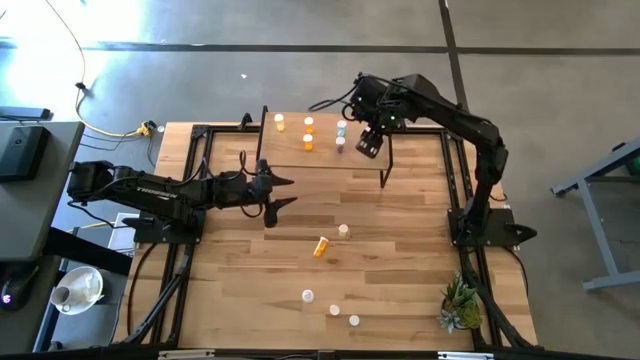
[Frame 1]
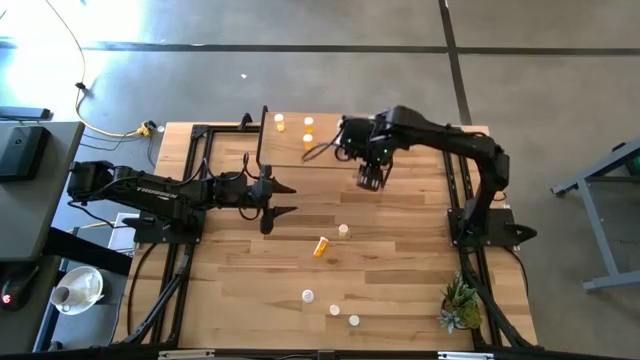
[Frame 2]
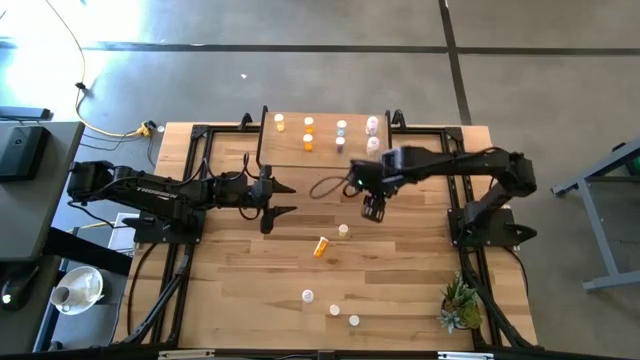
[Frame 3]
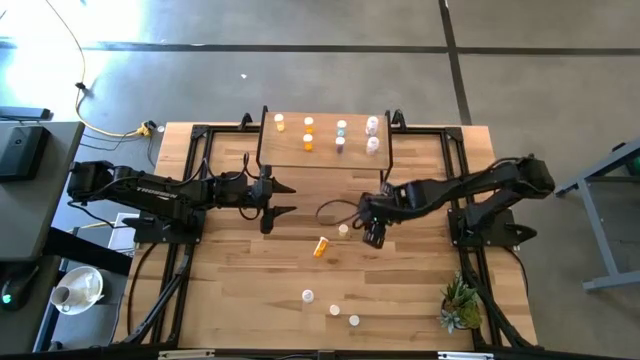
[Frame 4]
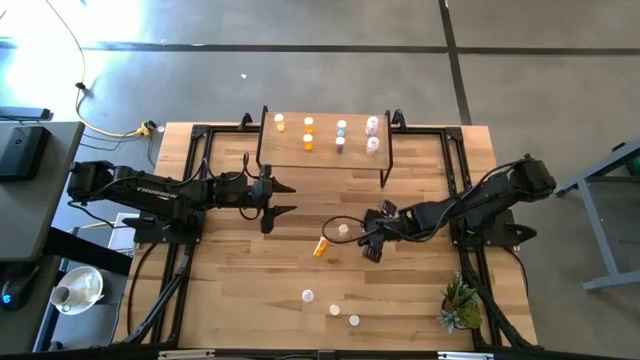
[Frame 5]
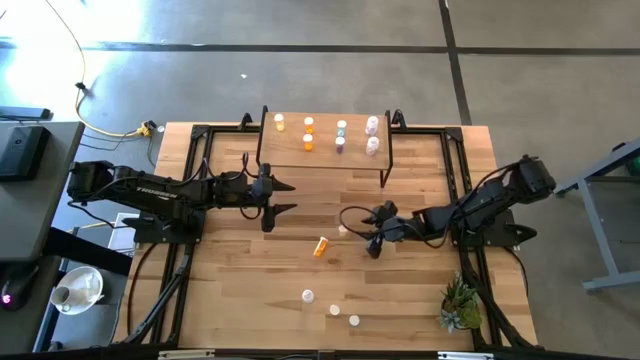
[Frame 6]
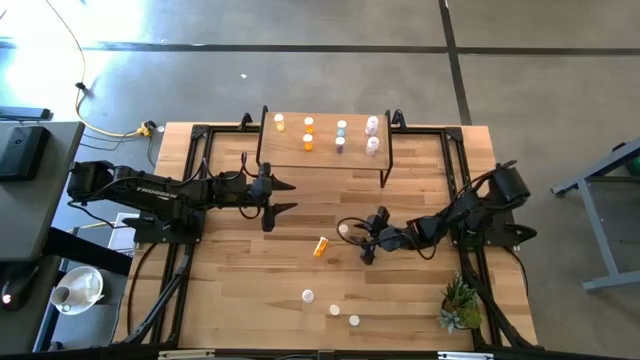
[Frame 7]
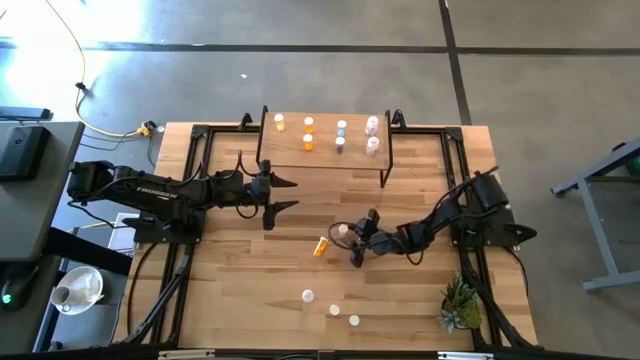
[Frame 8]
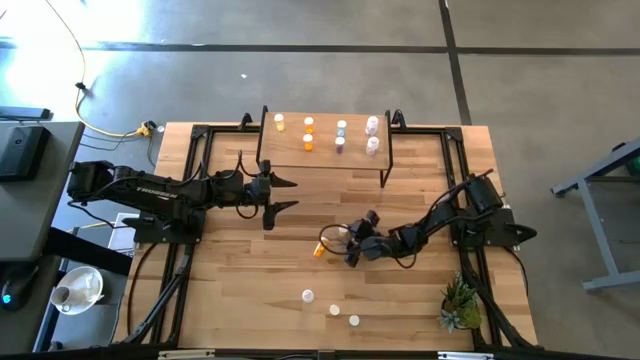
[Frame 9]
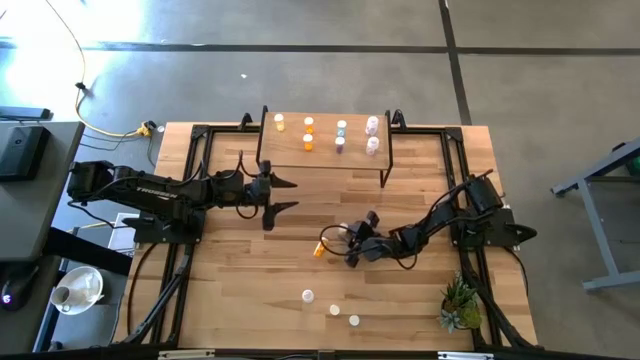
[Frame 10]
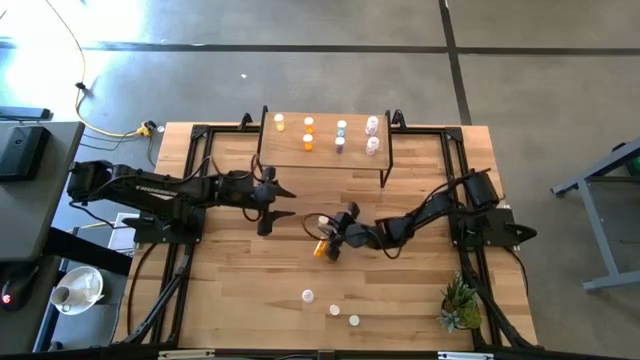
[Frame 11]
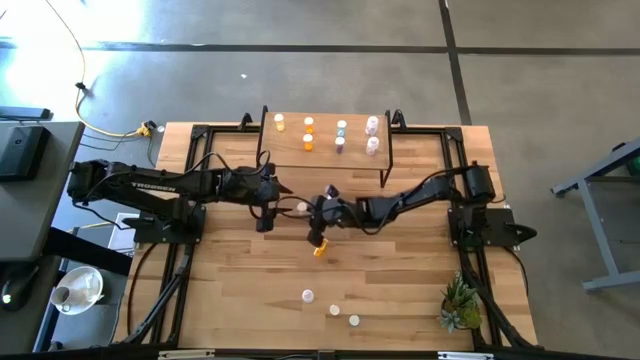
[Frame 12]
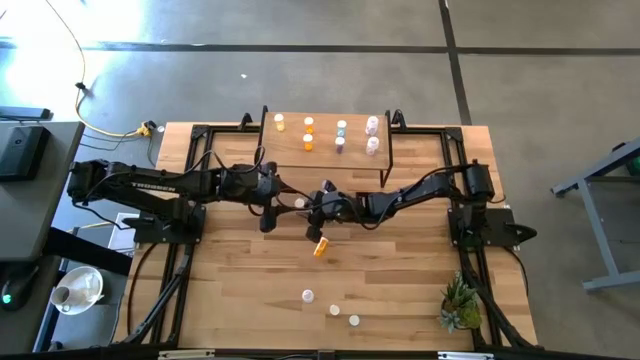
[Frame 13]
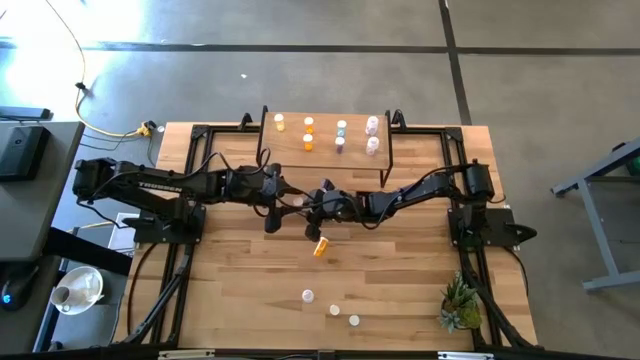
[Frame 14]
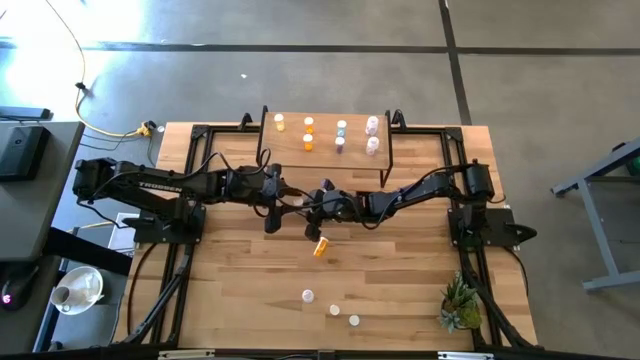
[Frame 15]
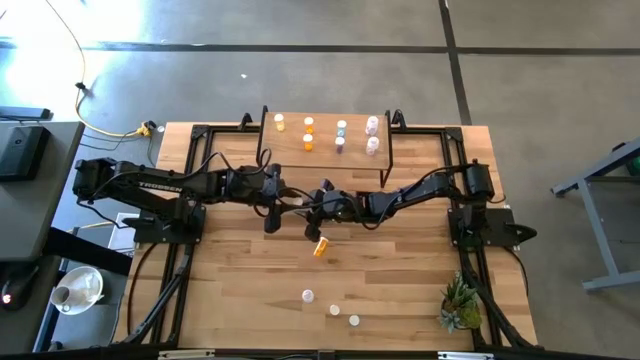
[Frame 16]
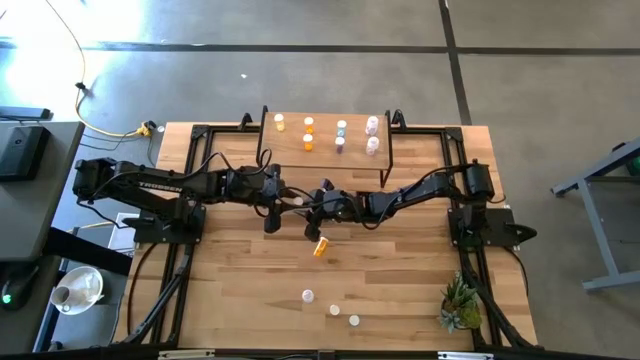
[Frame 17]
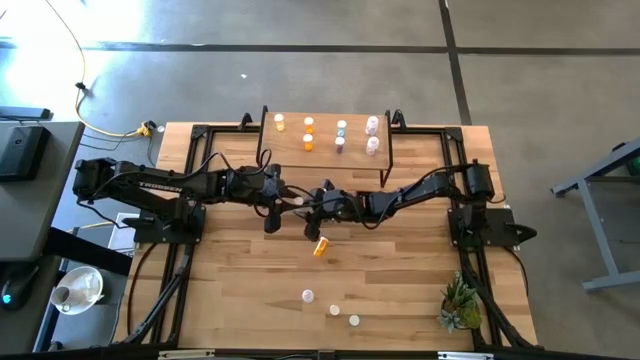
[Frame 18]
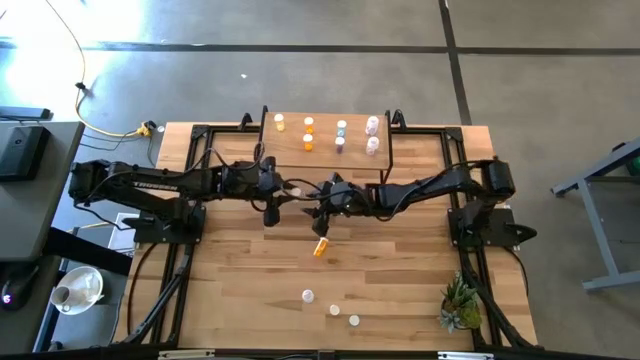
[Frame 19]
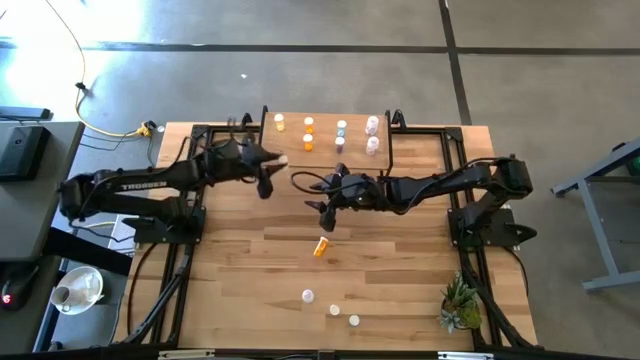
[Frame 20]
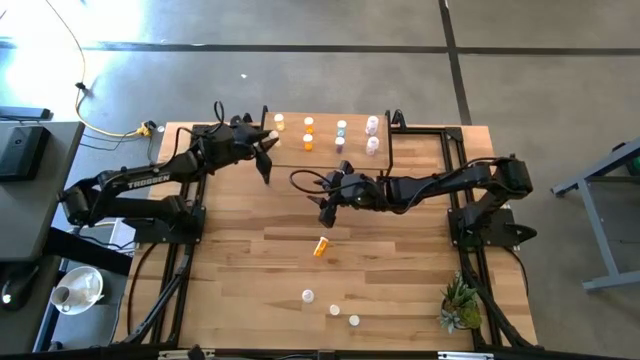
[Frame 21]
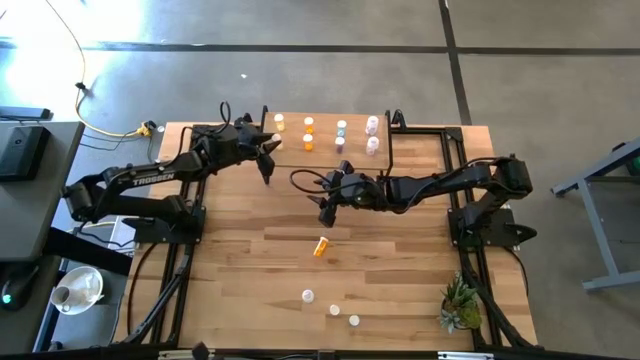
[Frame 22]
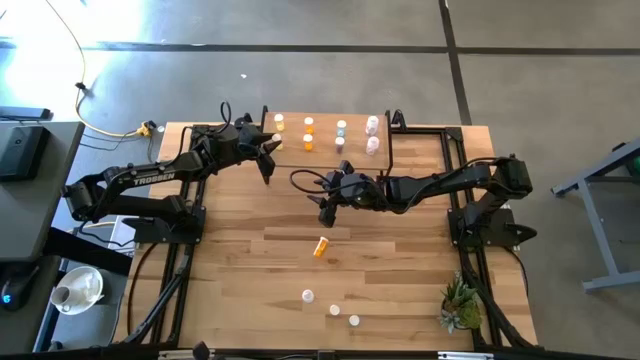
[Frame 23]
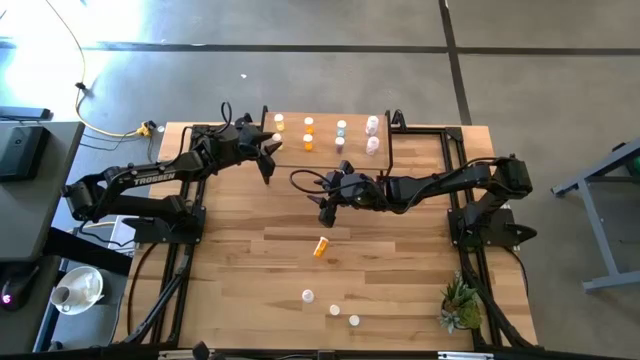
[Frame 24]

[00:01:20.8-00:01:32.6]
Task: Pick and place medicine bottles onto shelf by color
Put the top yellow pill bottle on the shelf aligned with the yellow pill bottle on the shelf

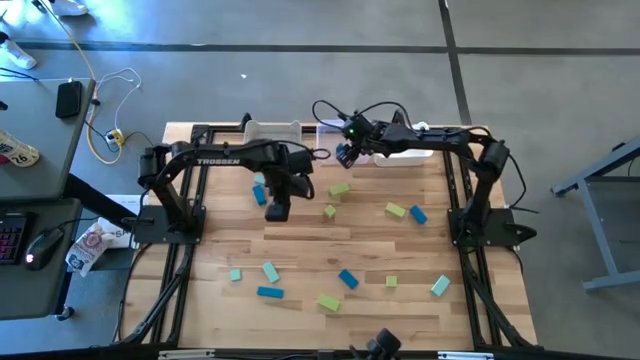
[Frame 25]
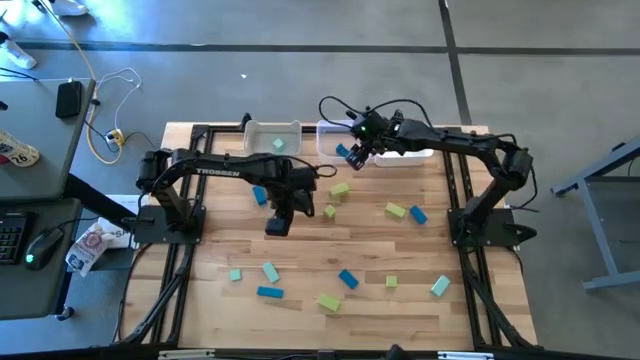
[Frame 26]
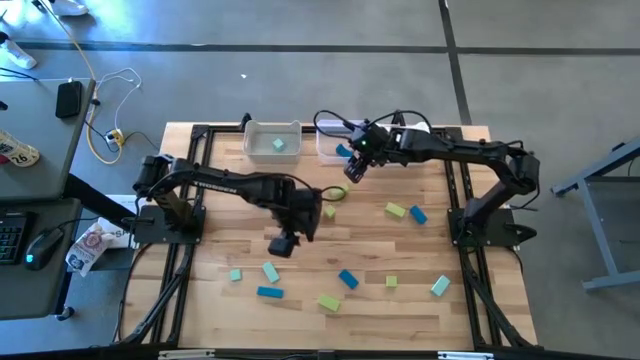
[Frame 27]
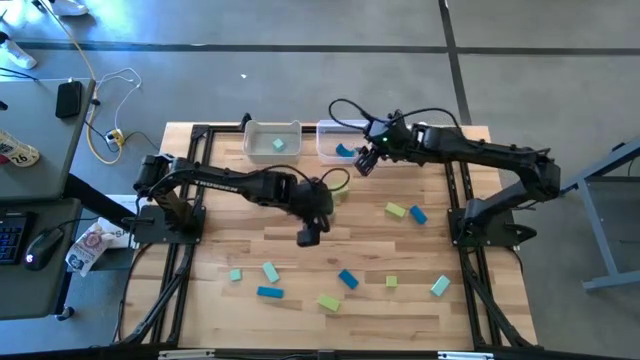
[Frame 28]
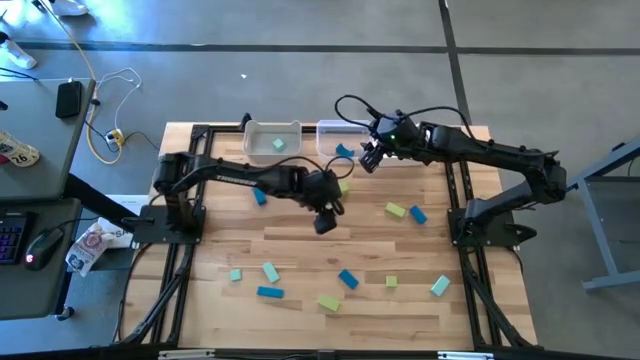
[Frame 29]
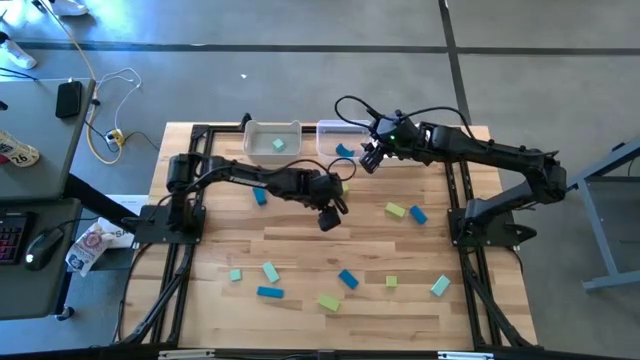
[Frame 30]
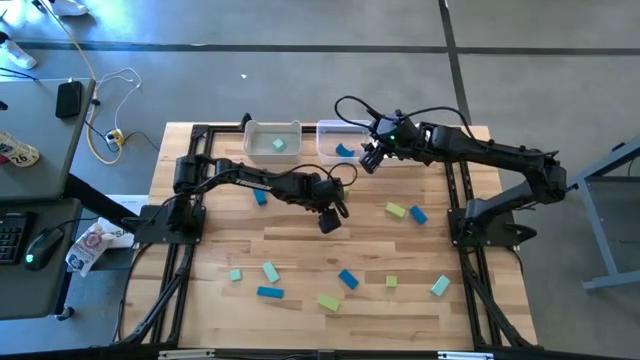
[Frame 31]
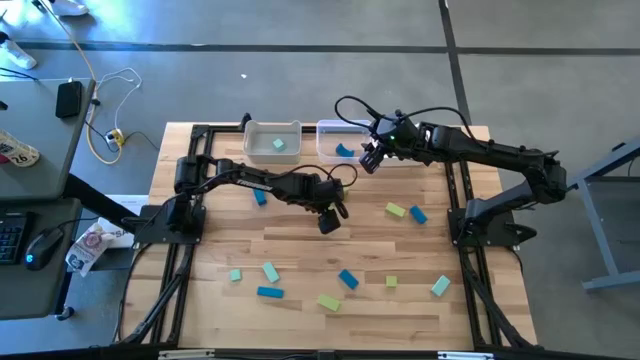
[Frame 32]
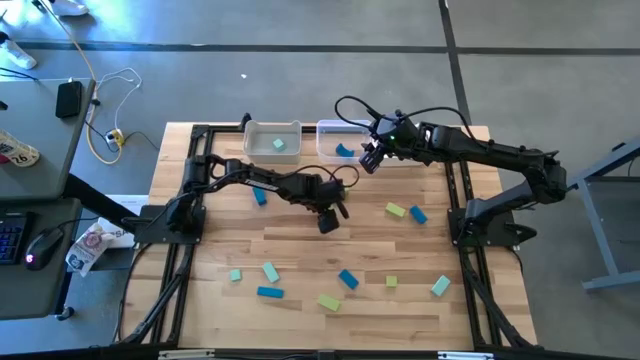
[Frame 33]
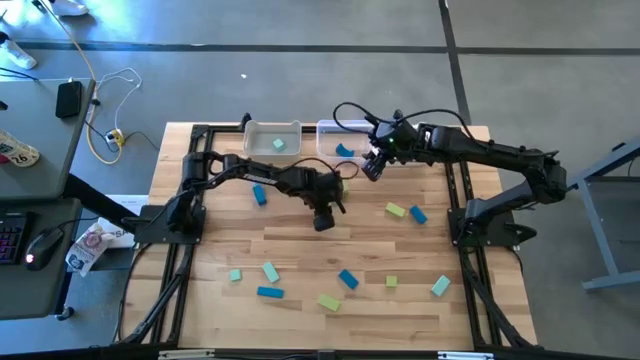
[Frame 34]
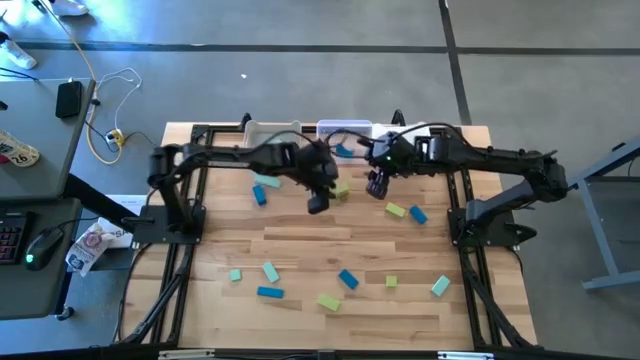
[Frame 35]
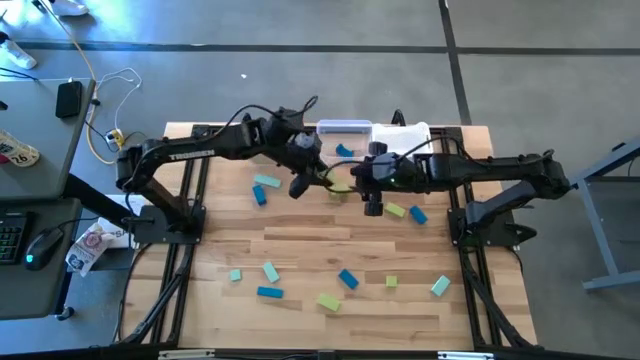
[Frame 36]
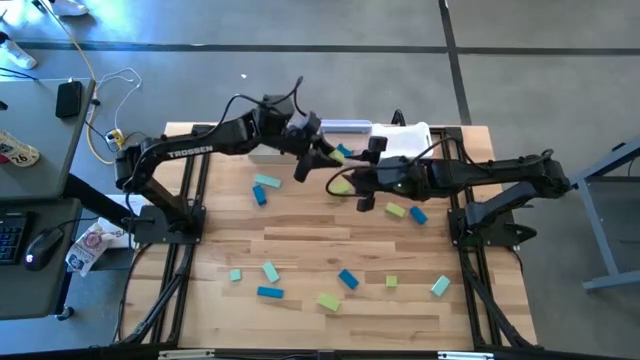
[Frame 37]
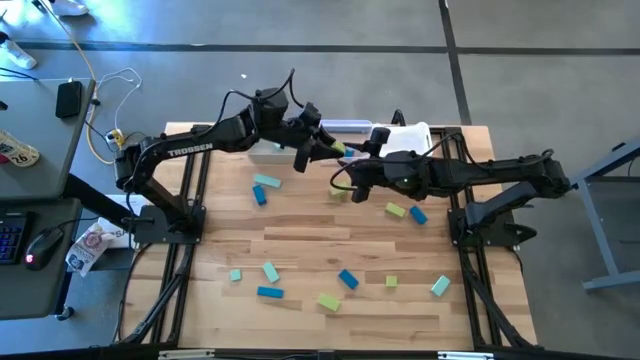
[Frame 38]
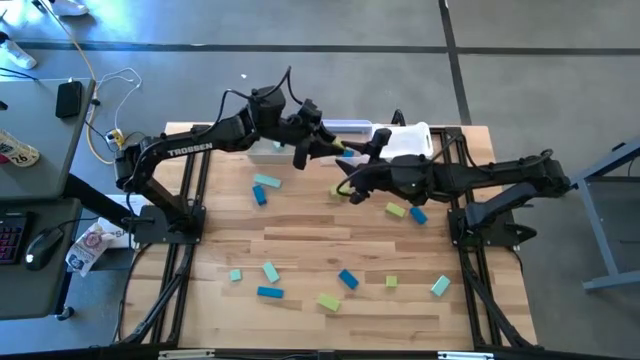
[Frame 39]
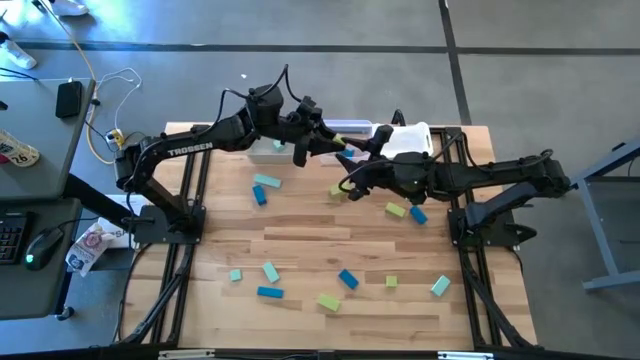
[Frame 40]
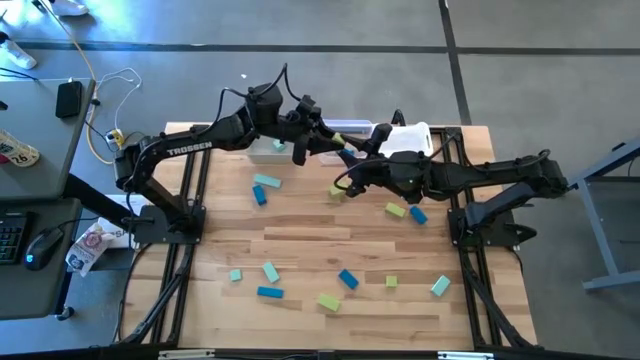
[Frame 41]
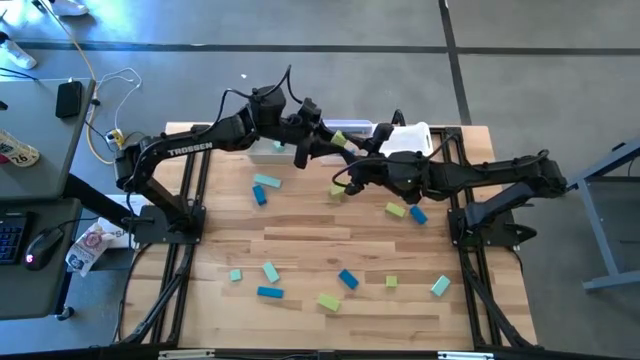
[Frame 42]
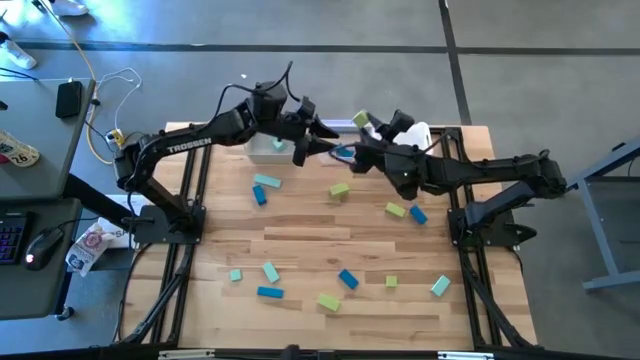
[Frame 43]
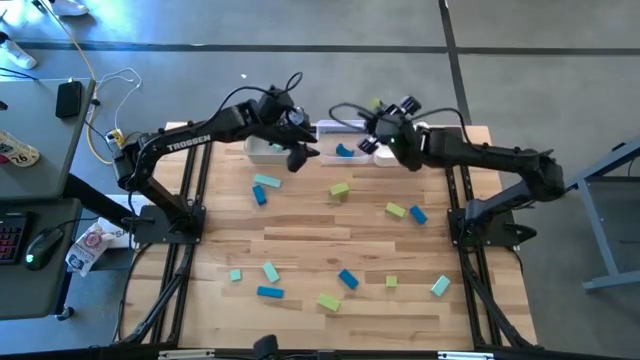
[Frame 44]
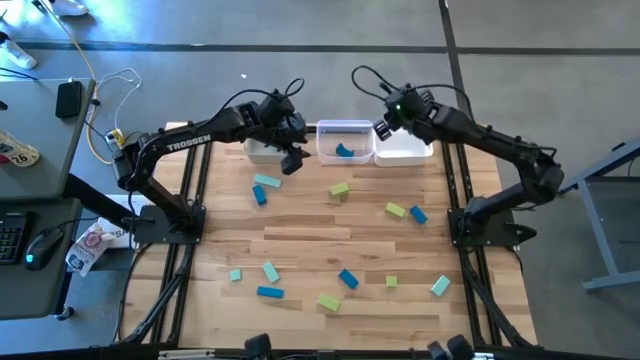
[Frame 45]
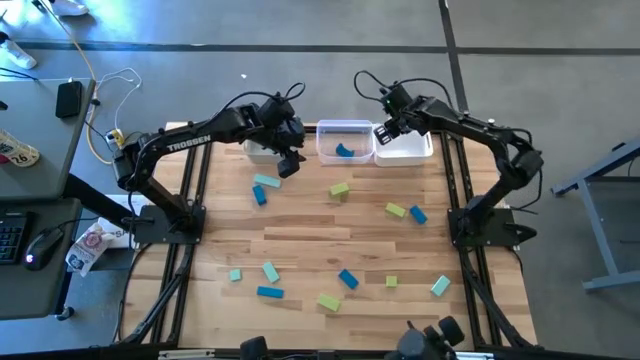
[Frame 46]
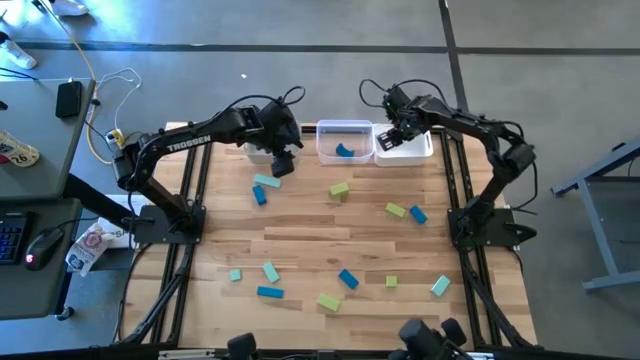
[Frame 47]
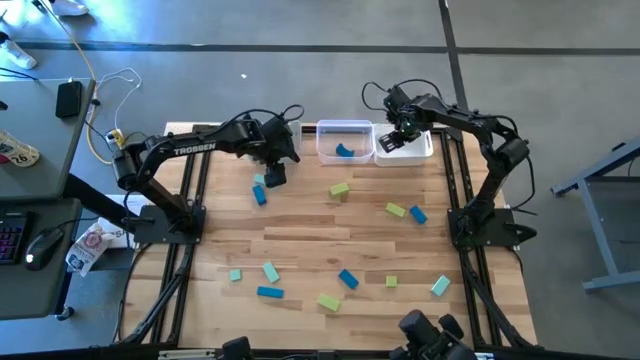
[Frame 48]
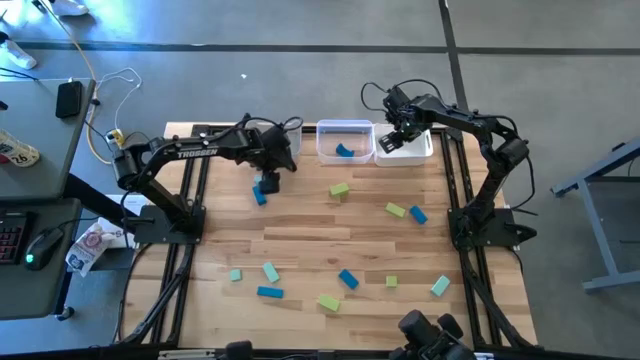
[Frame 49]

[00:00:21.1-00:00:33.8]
Task: Sort & place blocks by color
Put the green block into the white bin
